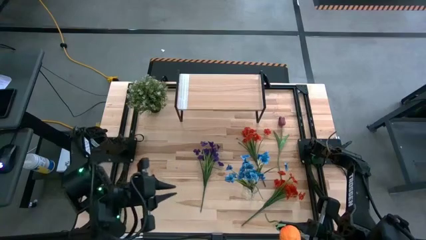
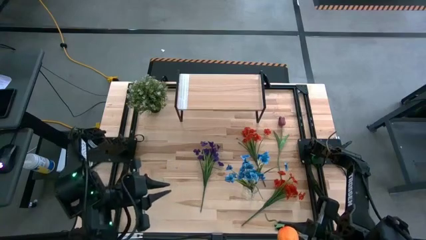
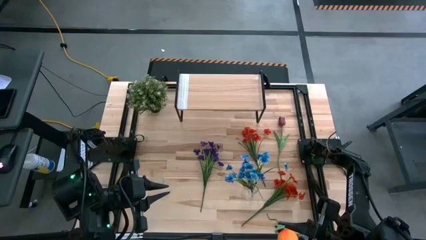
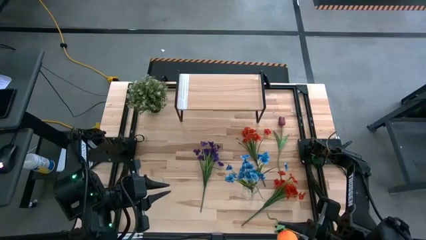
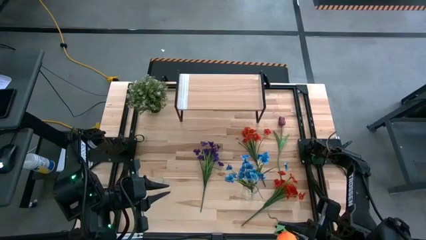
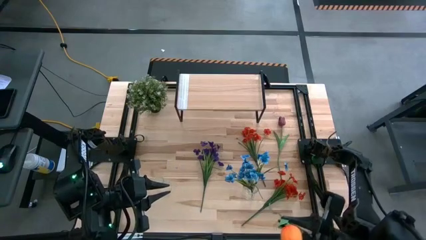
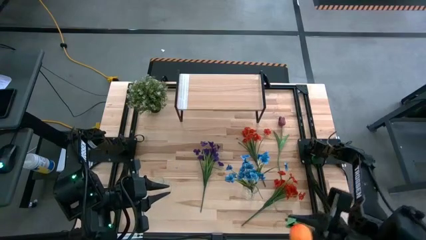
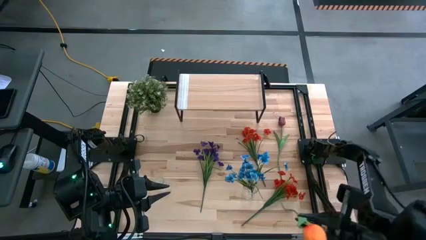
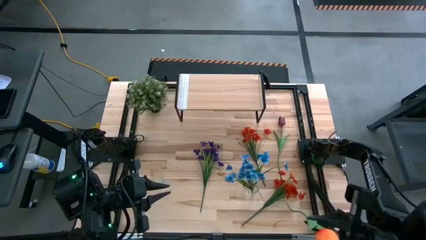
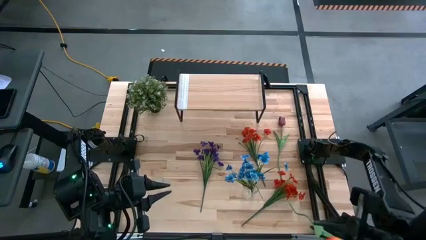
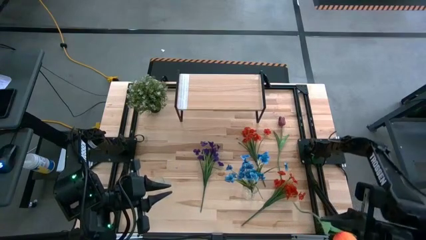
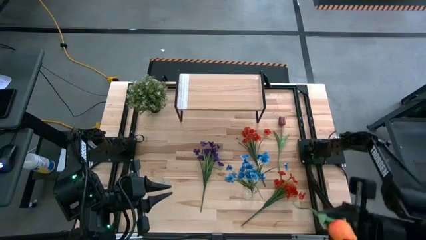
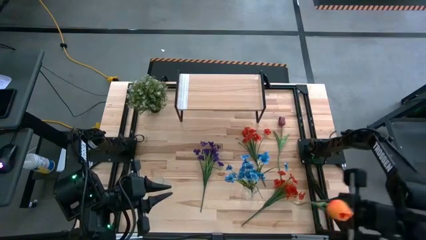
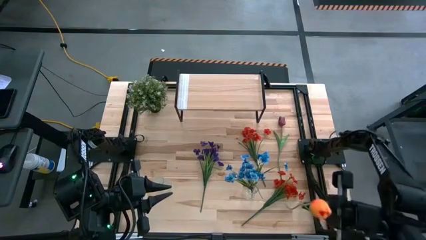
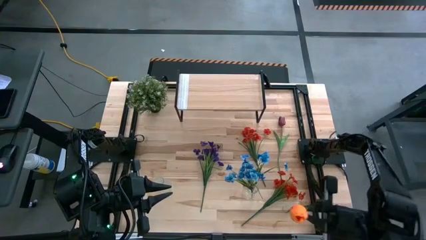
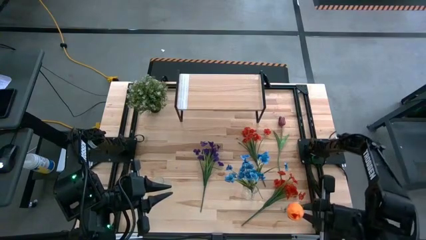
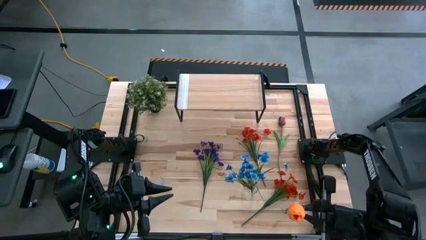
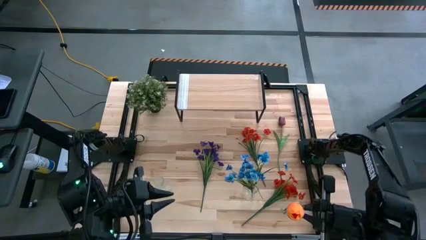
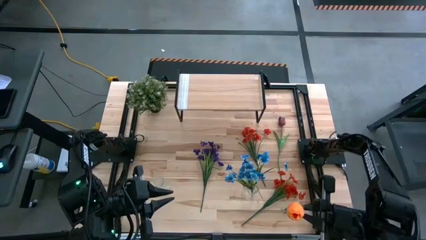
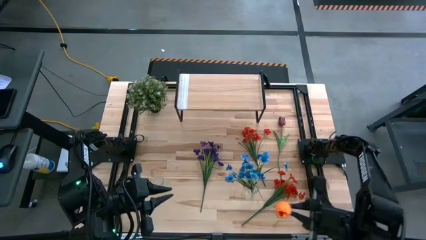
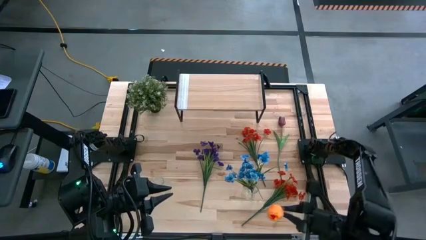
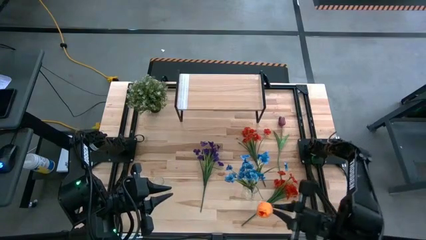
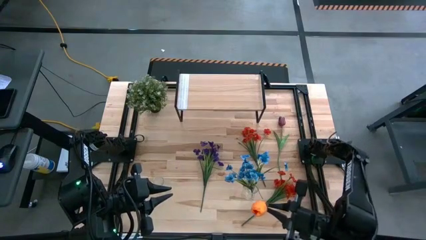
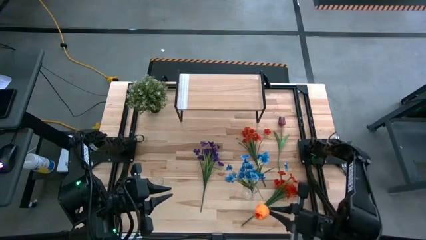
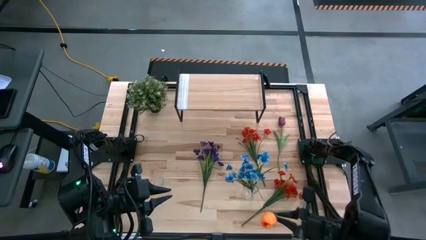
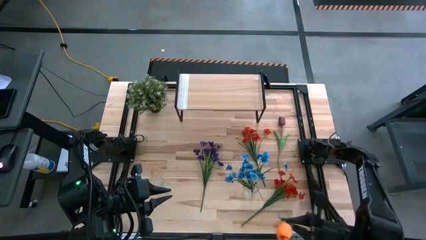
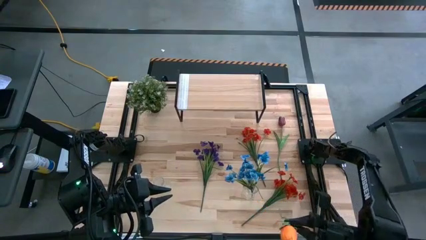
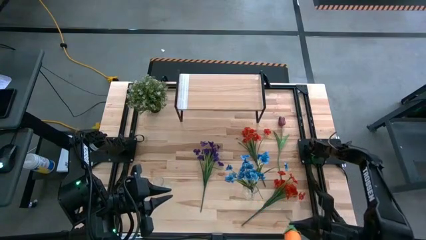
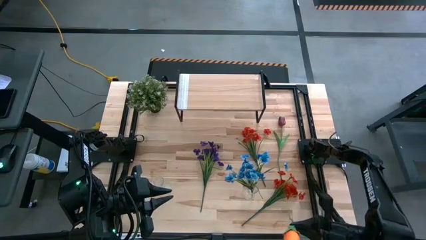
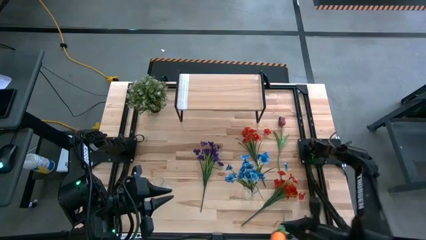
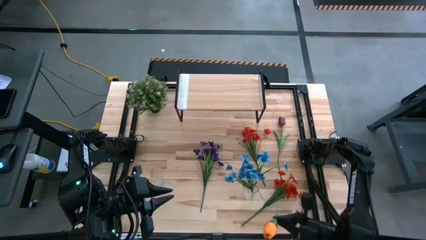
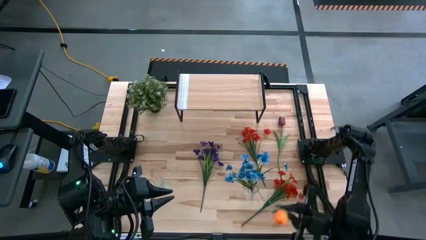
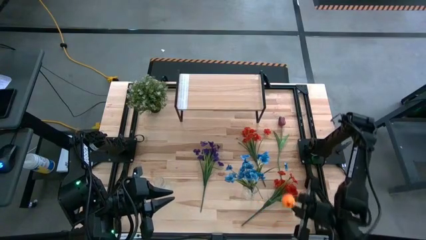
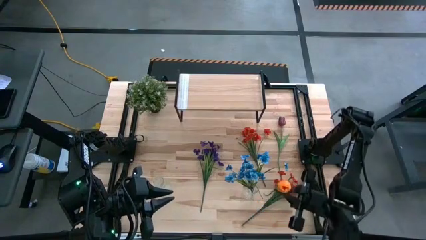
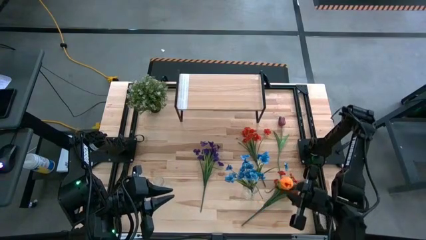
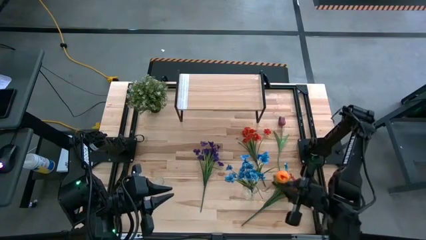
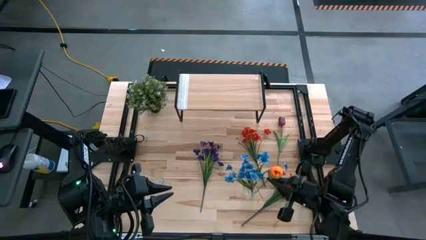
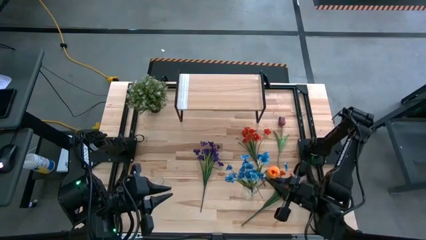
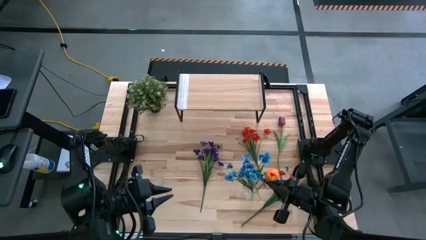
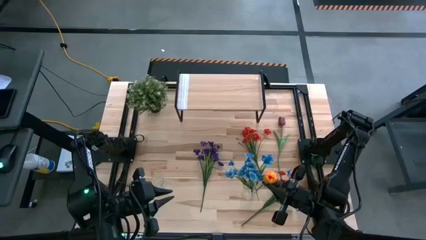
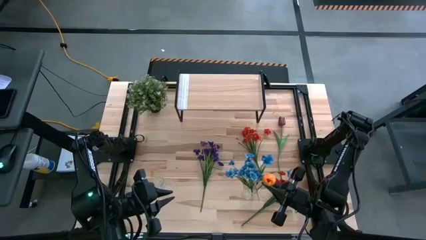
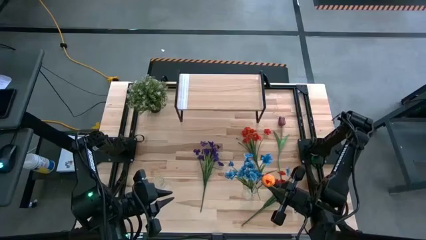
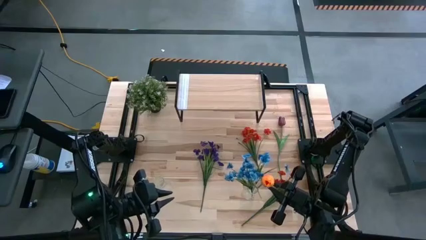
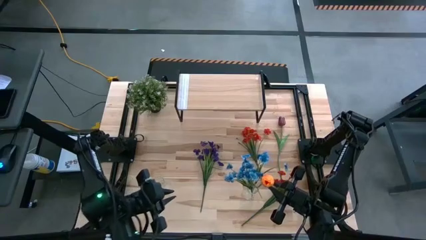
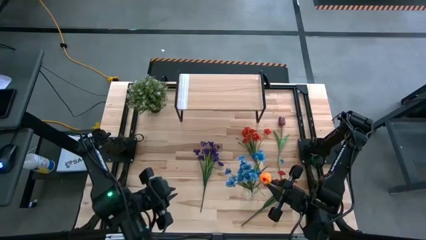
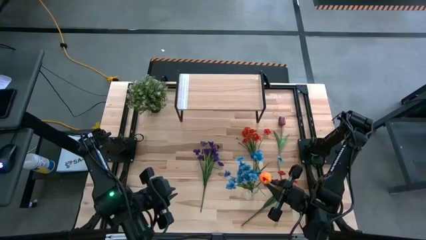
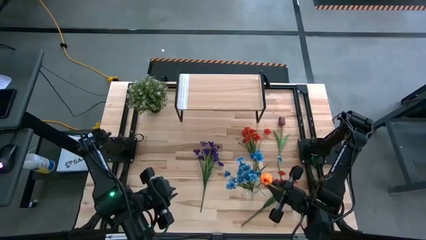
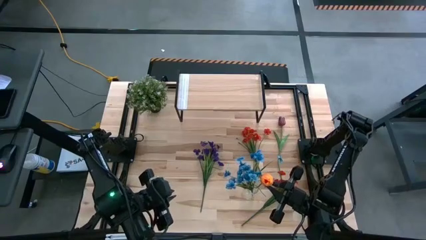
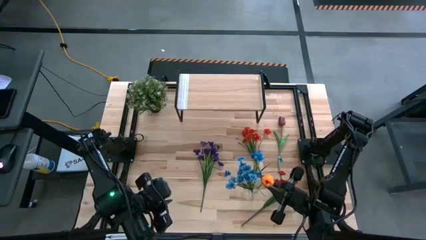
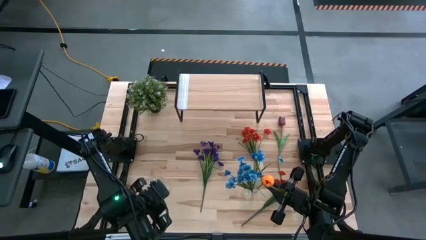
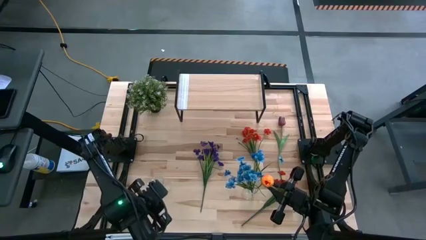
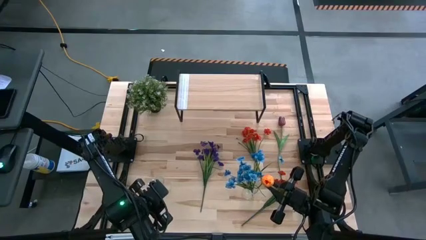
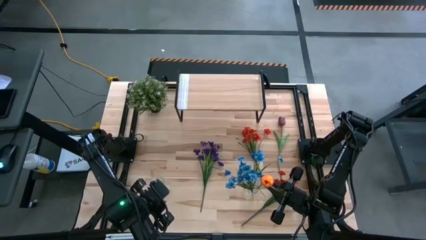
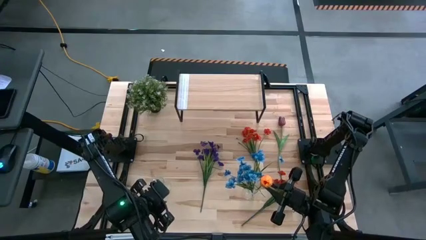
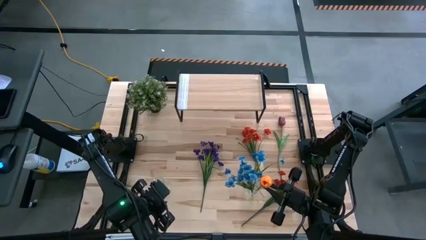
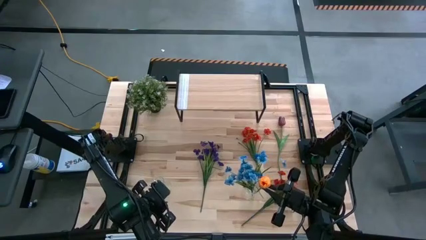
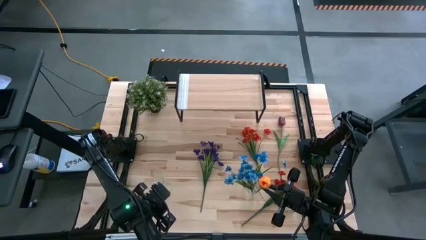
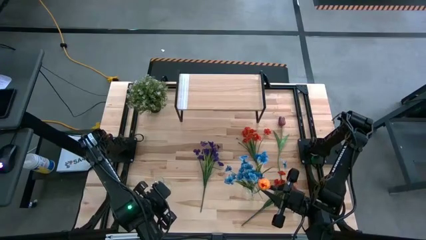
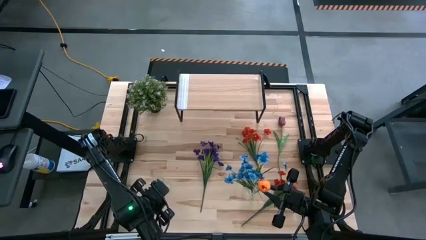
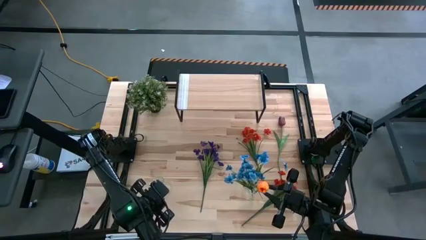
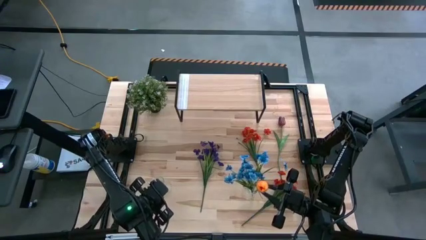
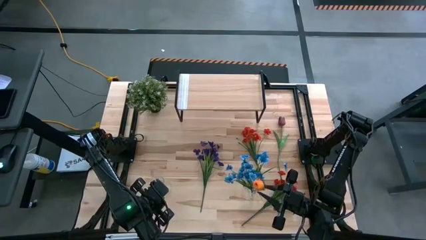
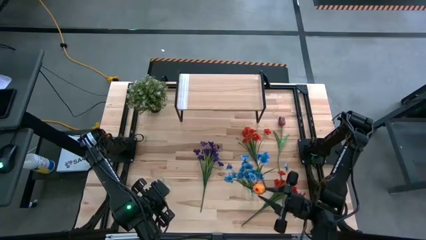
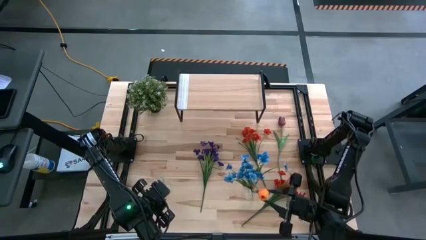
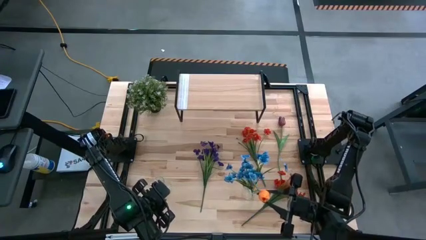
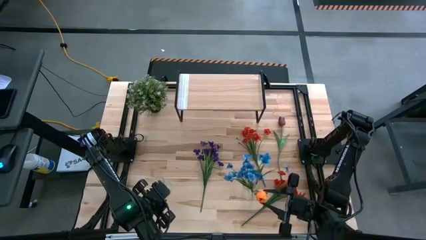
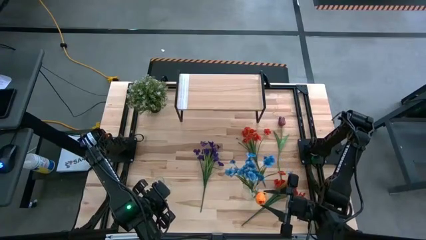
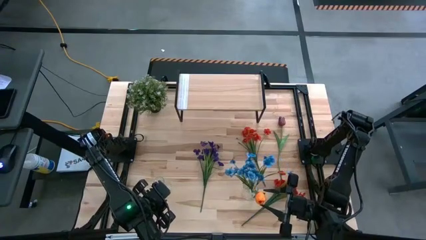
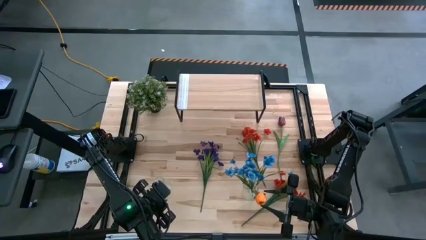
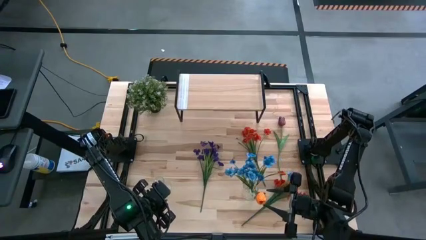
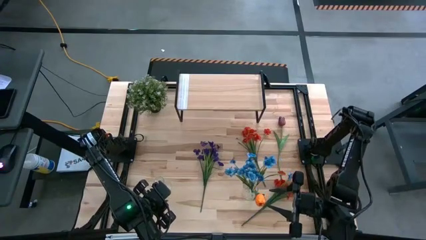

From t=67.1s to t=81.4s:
Task: Pick and place flowers into a vace then onto a shelf
Put the light orange flower into the right transparent vase
